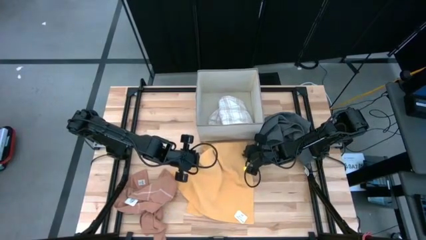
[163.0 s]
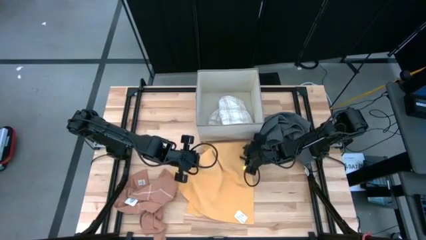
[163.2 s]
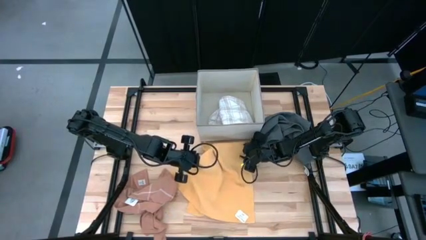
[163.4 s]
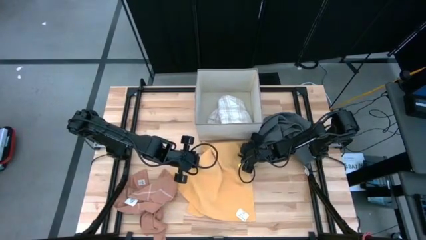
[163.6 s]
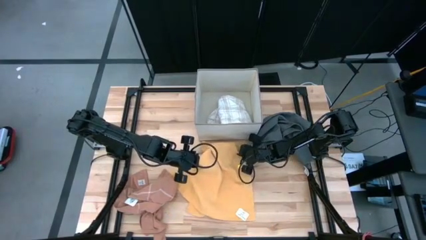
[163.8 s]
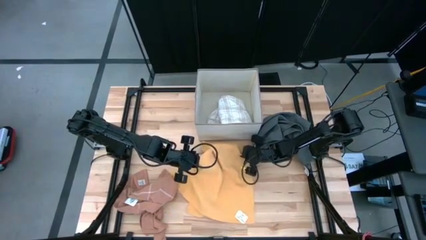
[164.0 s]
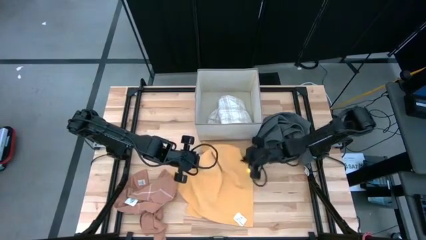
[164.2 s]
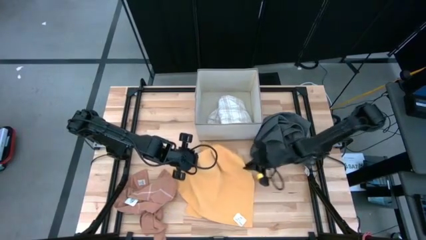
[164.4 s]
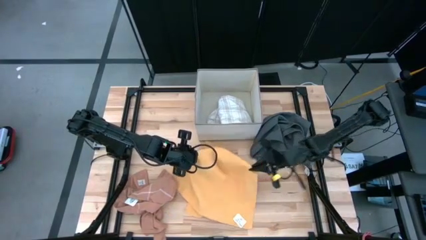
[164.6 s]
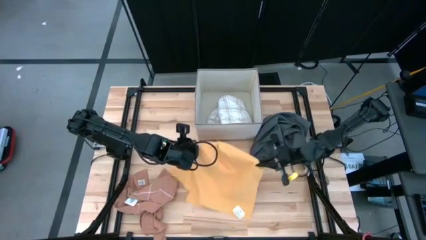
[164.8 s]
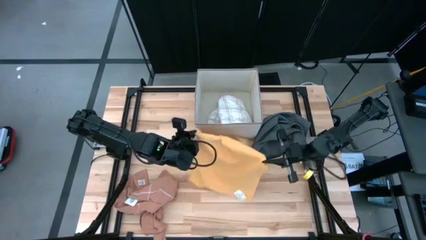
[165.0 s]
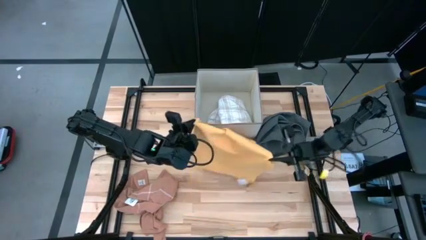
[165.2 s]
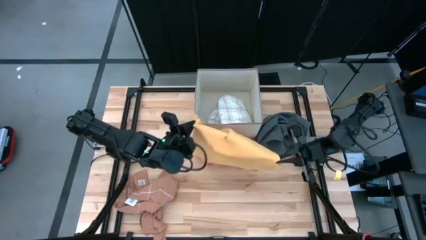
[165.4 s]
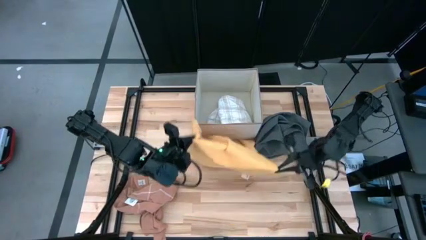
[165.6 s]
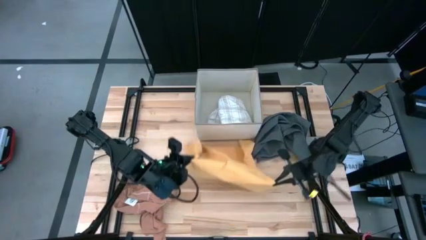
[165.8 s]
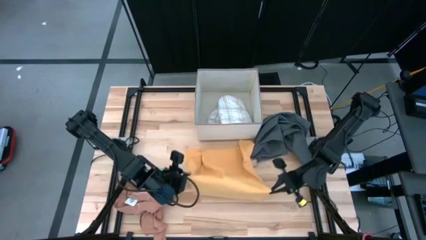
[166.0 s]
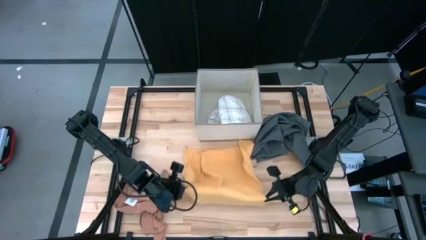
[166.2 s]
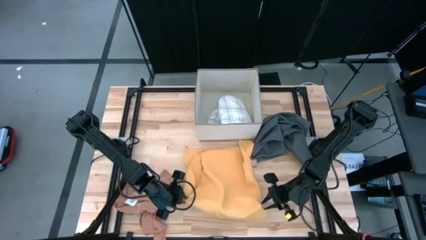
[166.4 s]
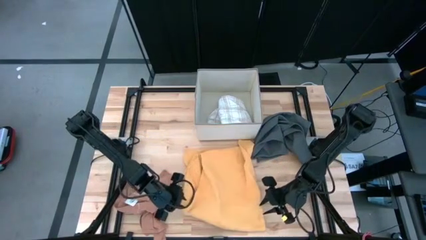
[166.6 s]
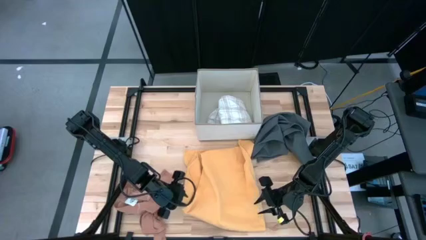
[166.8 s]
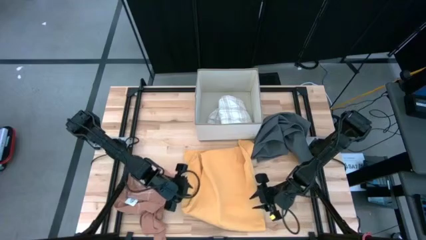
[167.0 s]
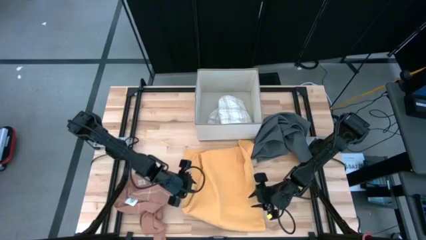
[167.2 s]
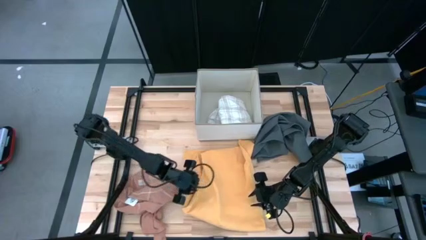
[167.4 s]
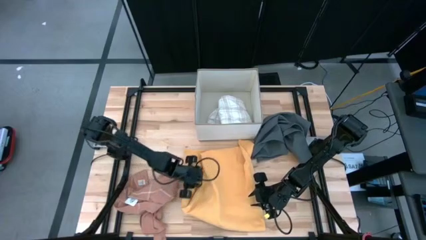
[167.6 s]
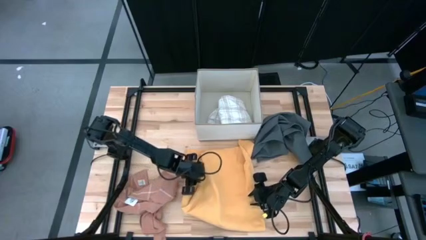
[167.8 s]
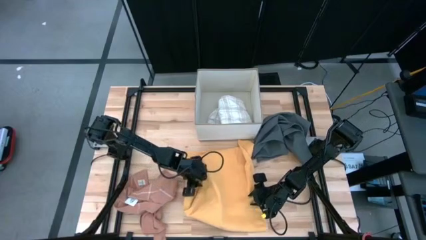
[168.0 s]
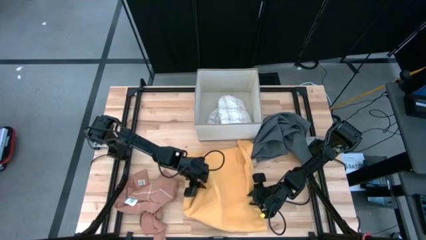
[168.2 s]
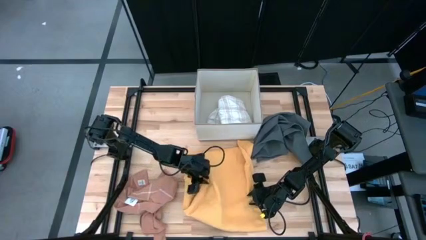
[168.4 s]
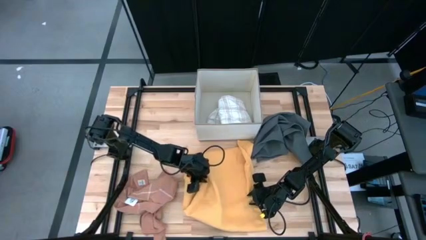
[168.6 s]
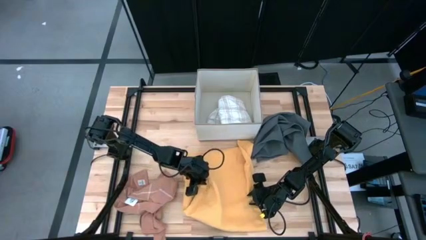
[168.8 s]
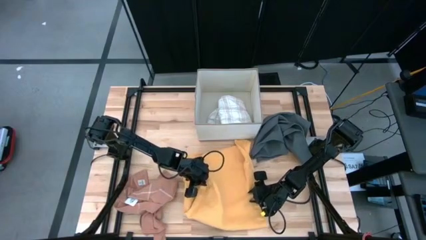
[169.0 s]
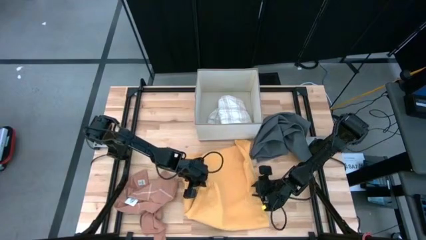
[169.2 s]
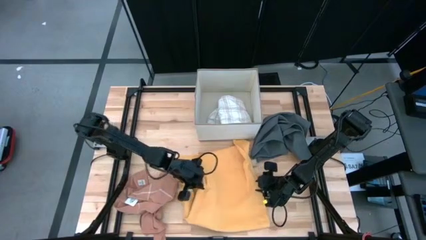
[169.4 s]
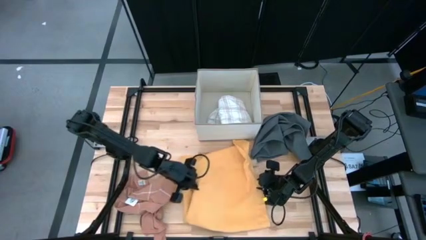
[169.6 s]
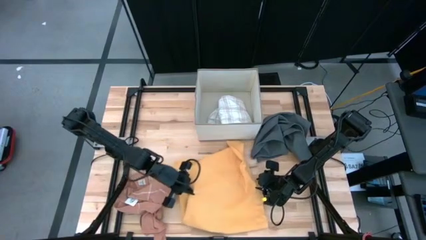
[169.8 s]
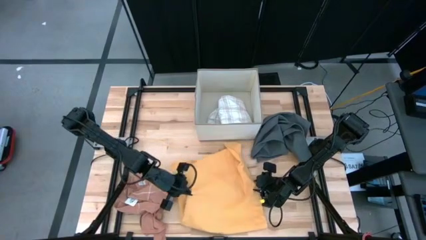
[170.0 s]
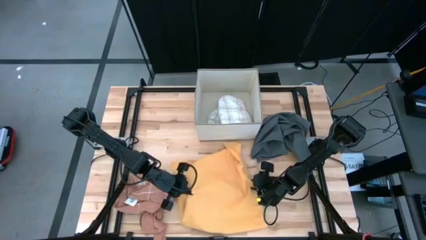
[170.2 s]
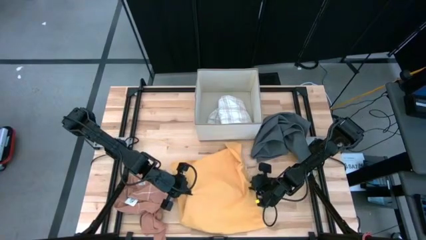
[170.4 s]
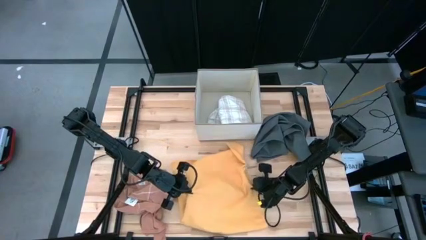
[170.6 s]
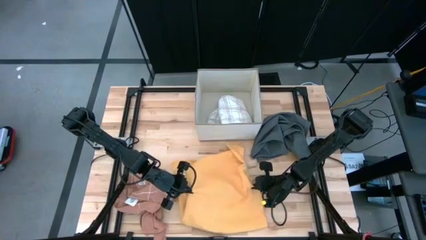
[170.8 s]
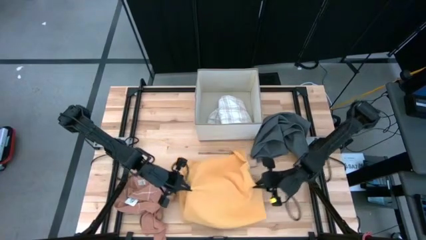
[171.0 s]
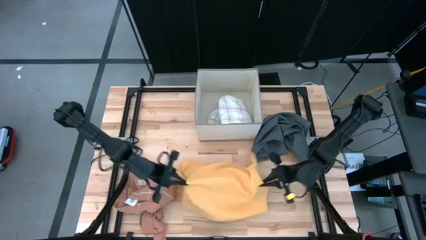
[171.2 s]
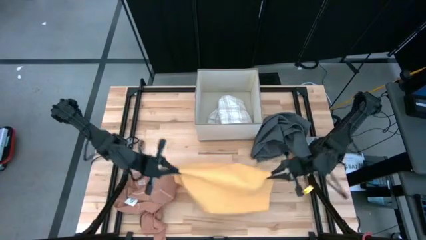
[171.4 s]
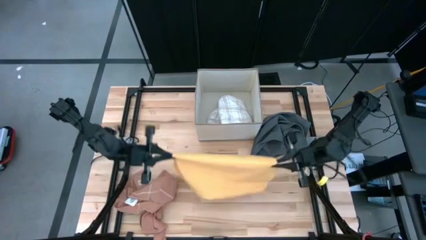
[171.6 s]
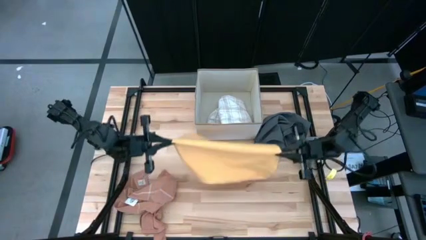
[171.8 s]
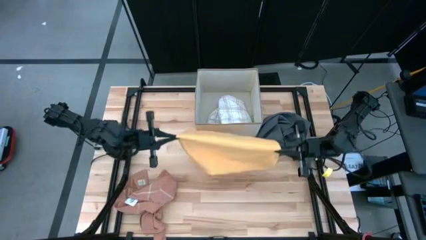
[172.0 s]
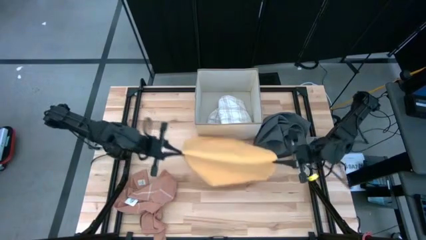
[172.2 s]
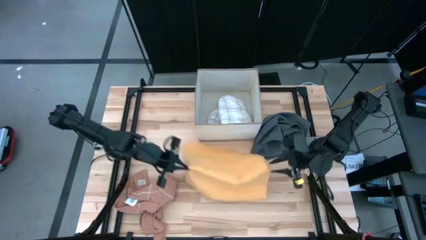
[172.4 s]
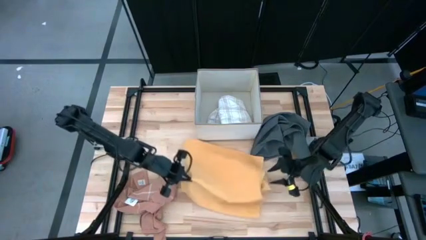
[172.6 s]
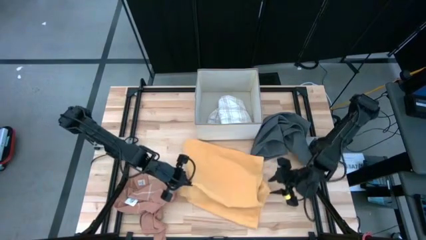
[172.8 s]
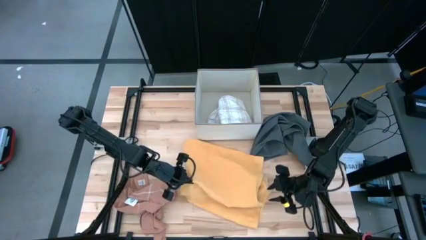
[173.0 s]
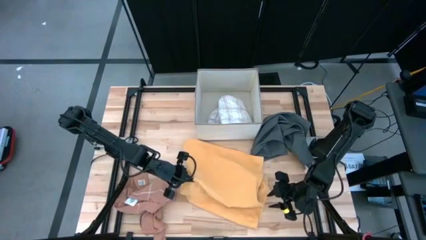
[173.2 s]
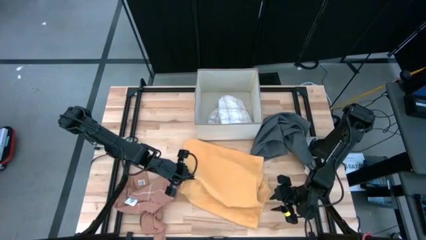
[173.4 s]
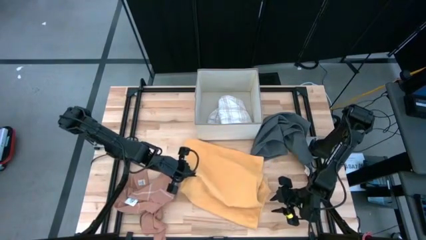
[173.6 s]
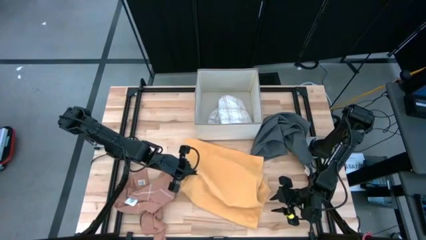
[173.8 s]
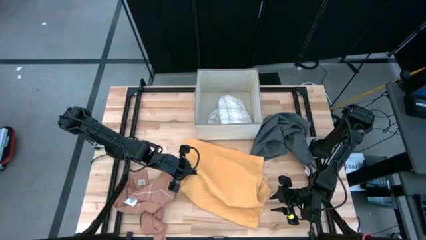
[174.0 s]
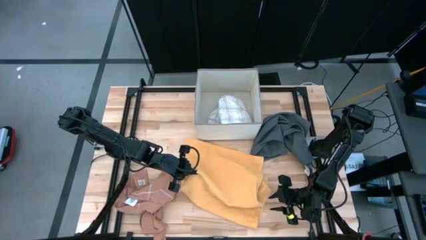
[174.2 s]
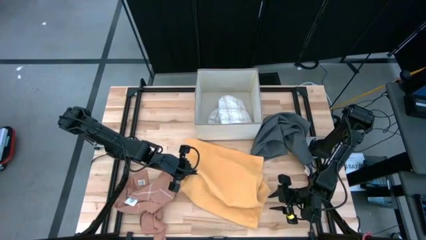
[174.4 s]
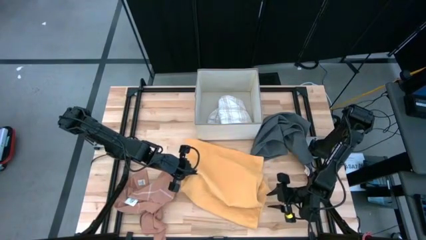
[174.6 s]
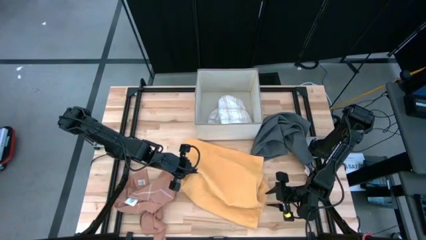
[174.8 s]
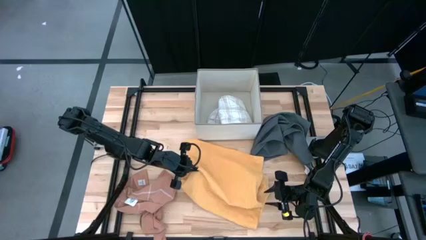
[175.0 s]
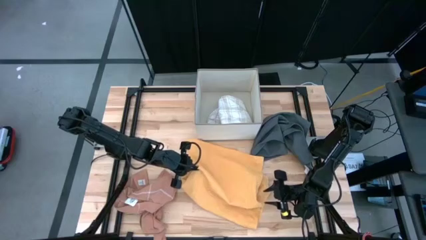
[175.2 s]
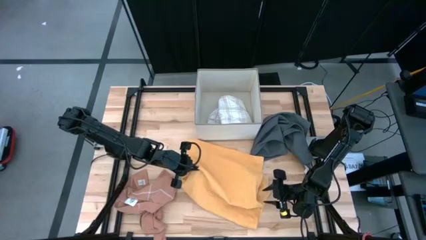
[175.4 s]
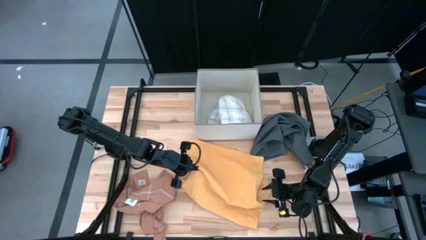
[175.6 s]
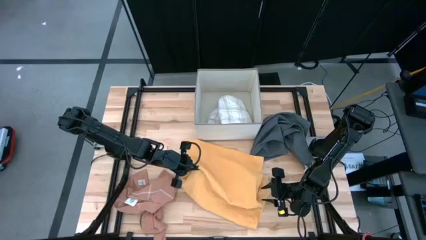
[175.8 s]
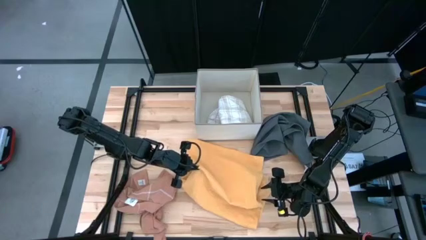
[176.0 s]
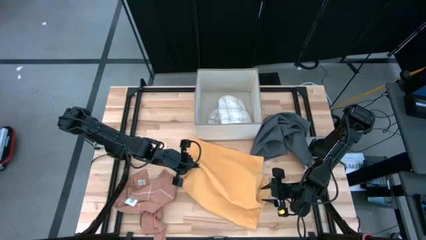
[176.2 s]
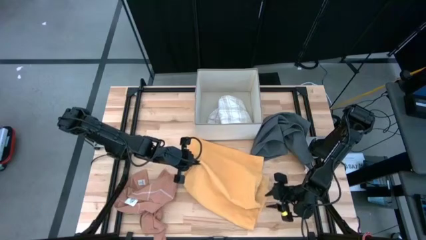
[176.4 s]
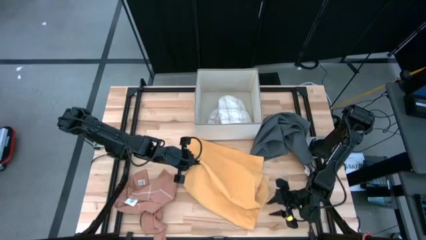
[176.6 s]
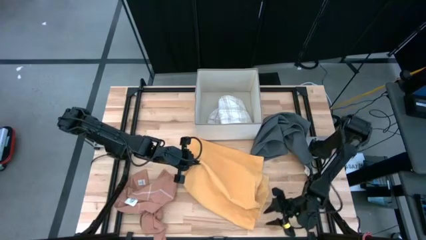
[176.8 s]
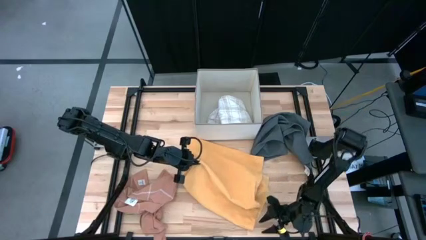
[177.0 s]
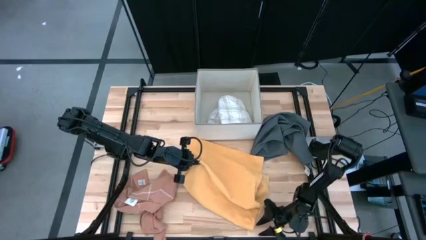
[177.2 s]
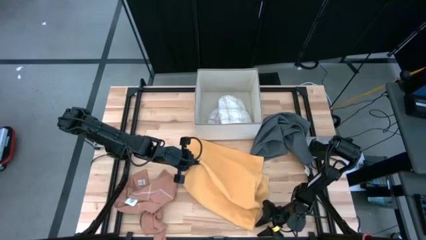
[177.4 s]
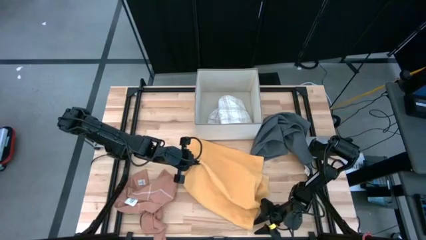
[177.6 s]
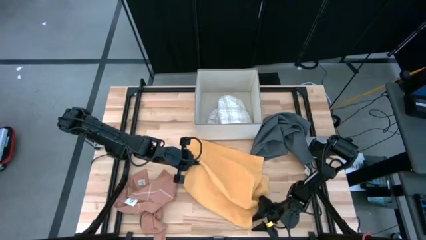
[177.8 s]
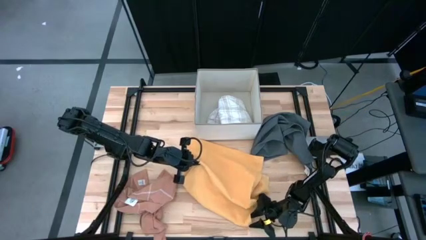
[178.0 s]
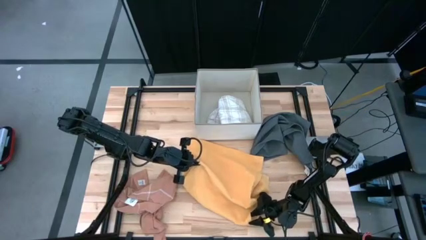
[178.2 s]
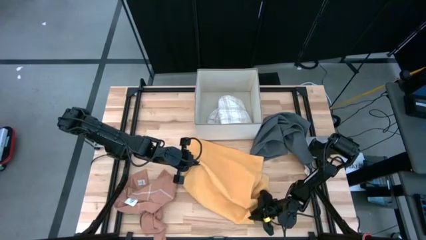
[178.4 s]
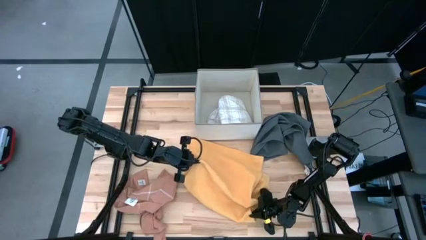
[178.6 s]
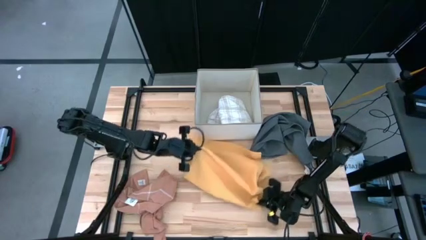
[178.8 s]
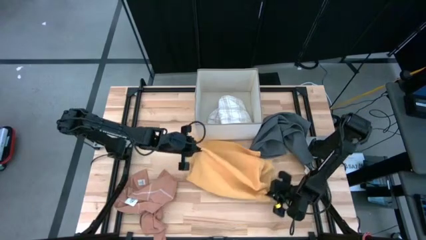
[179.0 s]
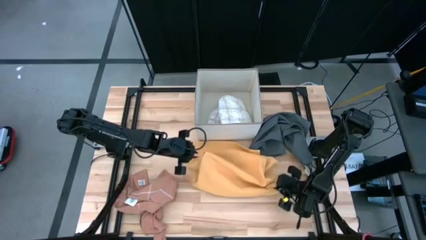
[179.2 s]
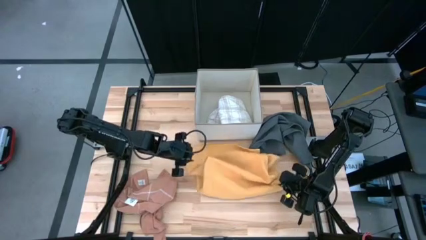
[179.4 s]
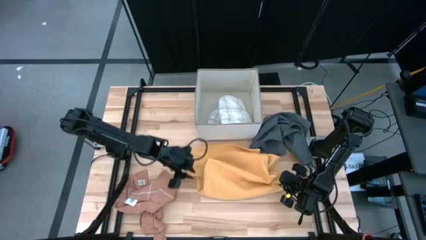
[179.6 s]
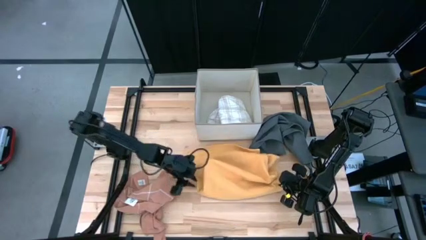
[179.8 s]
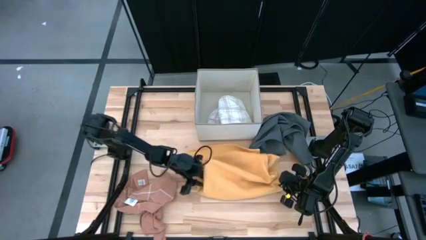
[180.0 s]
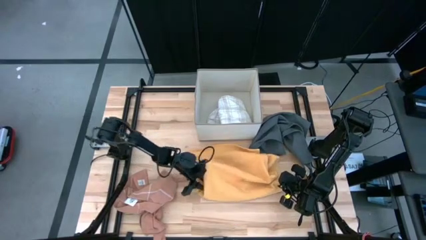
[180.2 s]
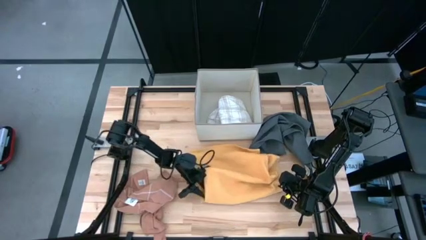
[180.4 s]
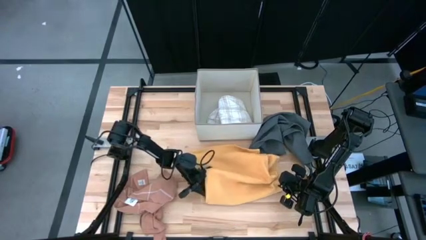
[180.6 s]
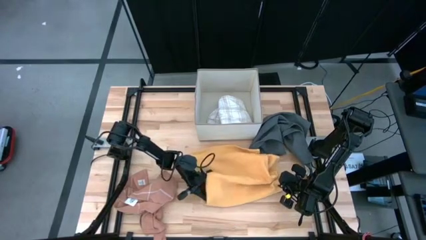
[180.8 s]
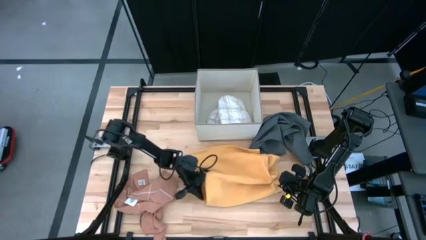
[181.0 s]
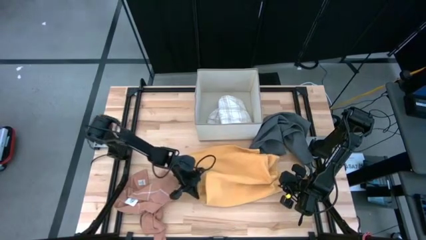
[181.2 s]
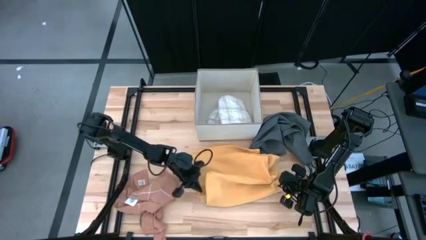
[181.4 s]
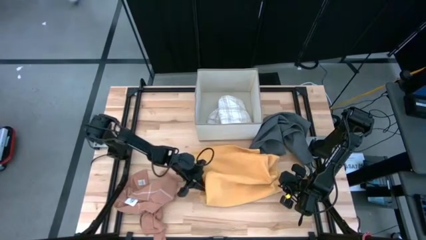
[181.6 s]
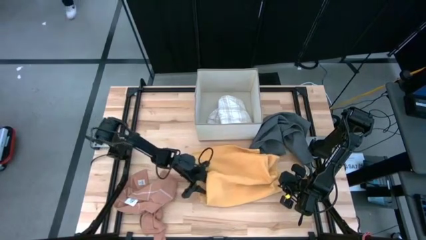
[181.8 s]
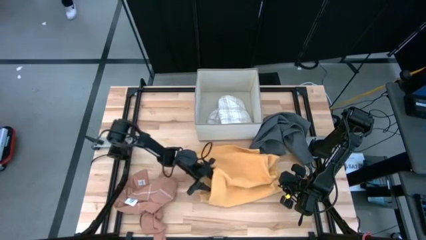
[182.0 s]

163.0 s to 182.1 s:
Task: Fold towel
Fold the yellow towel
